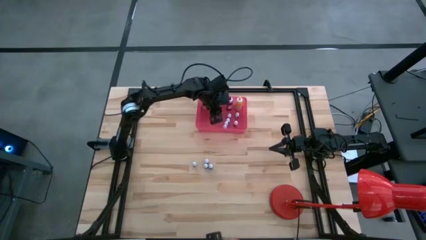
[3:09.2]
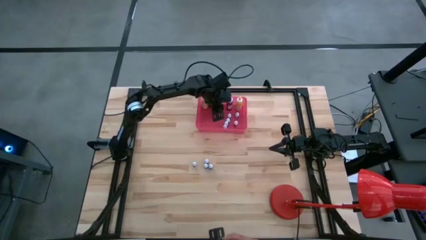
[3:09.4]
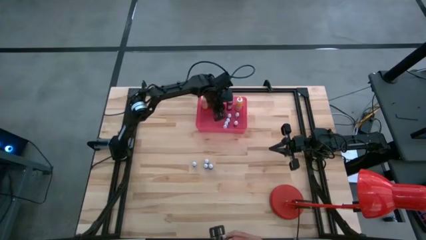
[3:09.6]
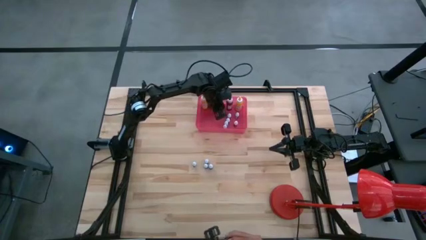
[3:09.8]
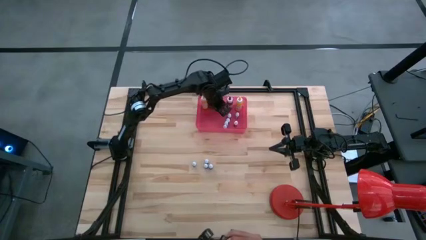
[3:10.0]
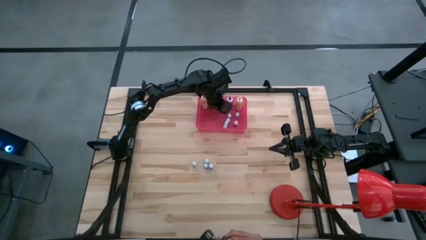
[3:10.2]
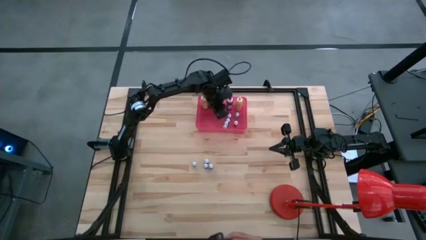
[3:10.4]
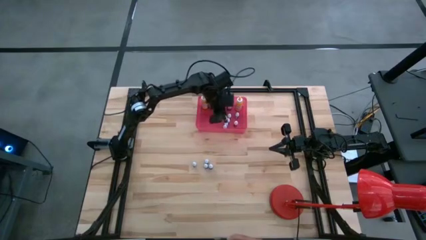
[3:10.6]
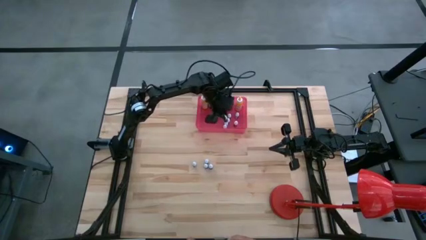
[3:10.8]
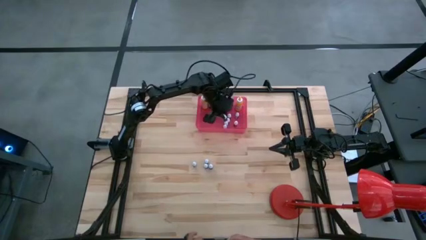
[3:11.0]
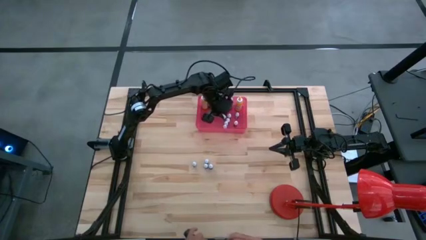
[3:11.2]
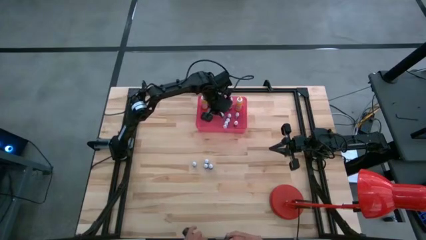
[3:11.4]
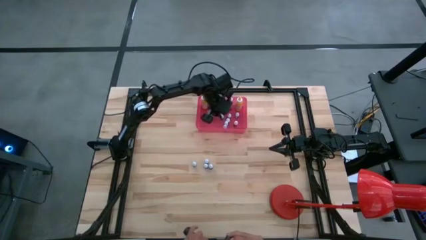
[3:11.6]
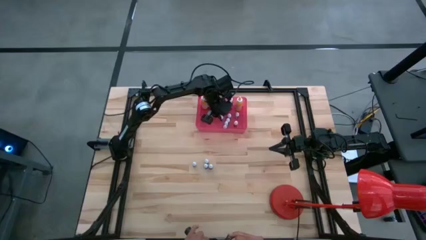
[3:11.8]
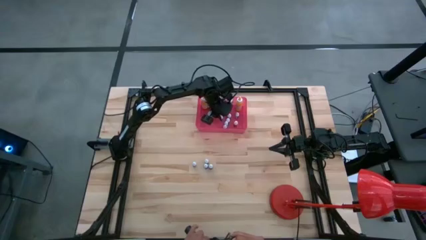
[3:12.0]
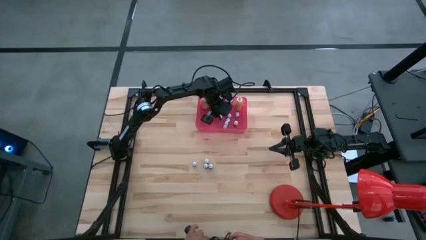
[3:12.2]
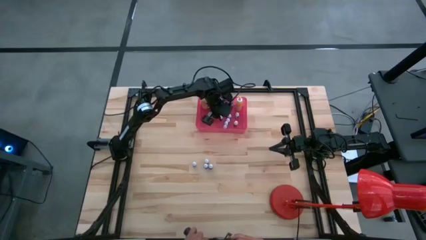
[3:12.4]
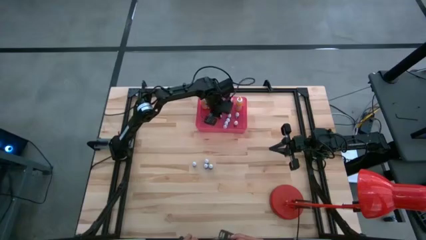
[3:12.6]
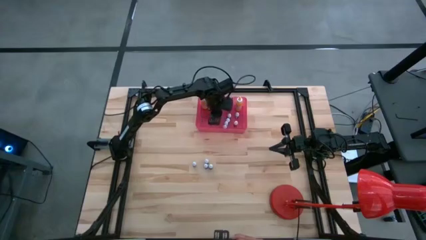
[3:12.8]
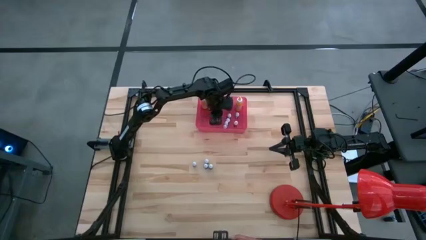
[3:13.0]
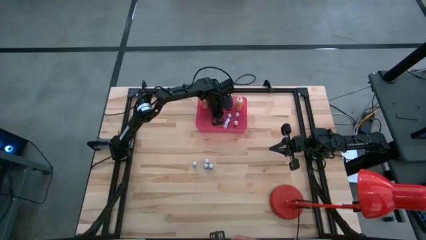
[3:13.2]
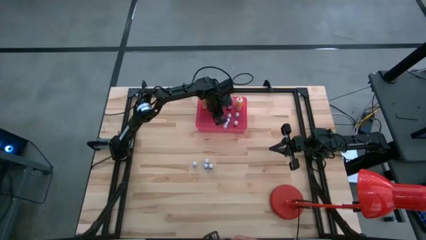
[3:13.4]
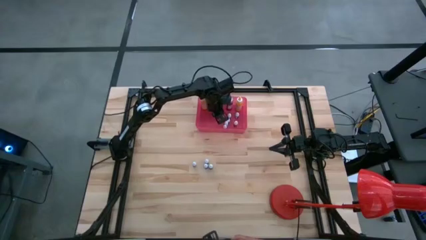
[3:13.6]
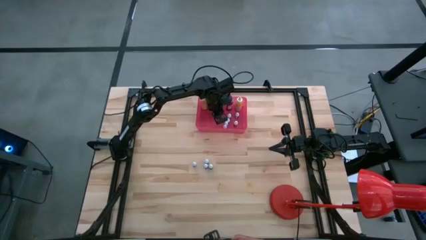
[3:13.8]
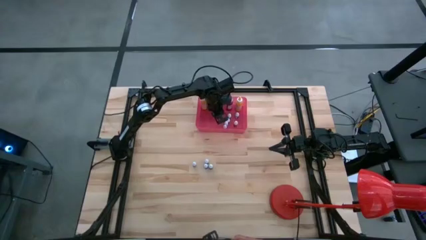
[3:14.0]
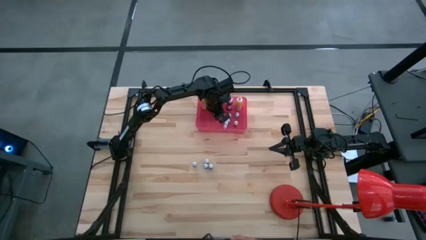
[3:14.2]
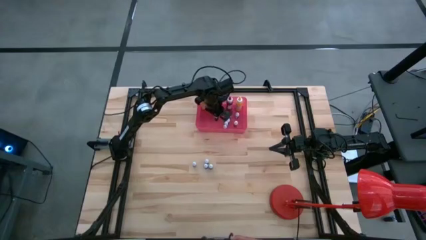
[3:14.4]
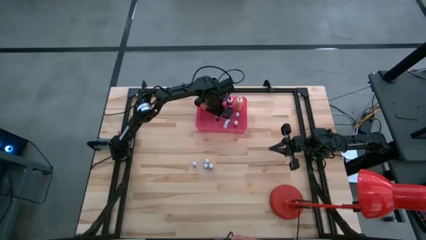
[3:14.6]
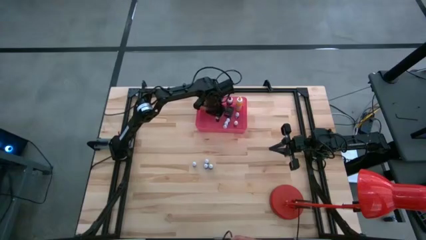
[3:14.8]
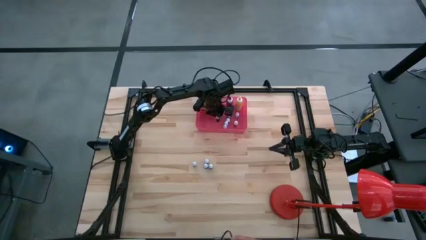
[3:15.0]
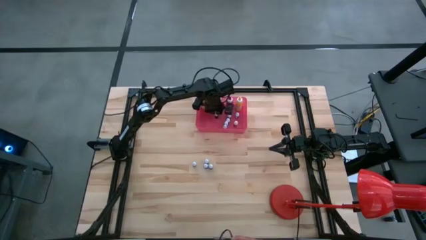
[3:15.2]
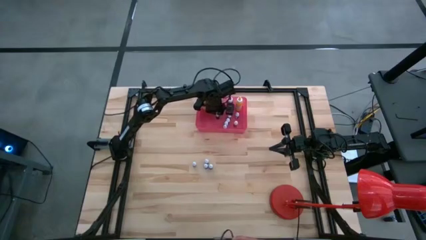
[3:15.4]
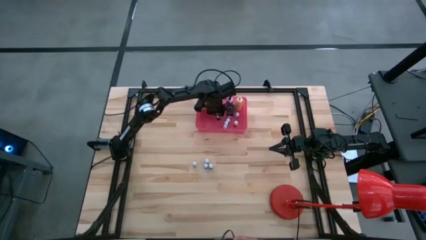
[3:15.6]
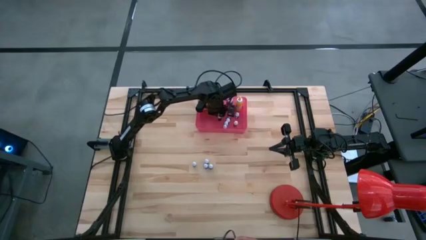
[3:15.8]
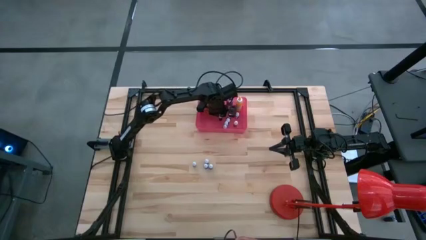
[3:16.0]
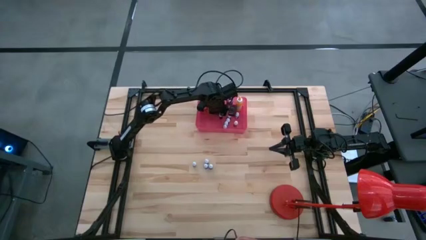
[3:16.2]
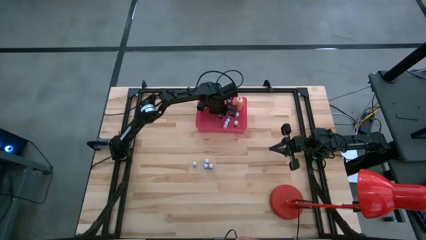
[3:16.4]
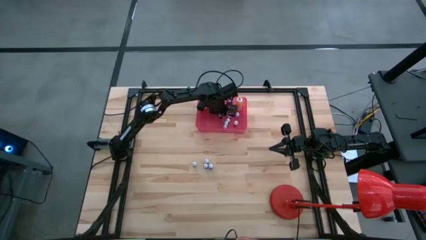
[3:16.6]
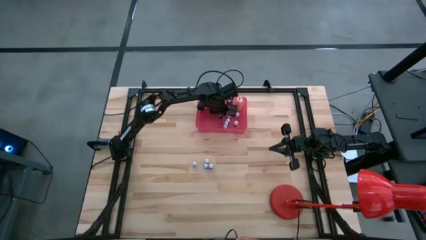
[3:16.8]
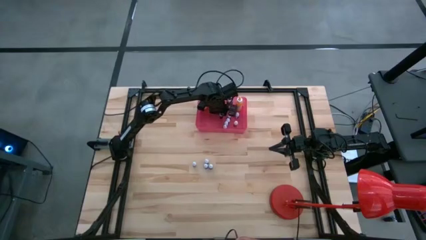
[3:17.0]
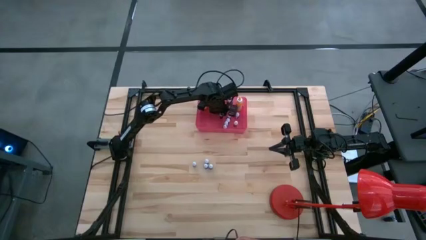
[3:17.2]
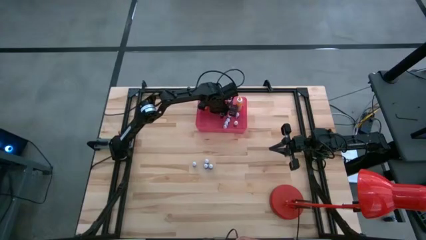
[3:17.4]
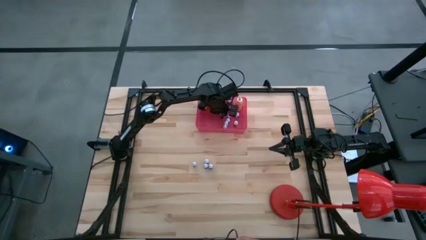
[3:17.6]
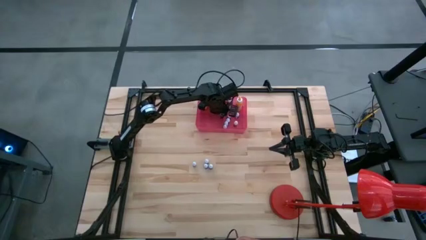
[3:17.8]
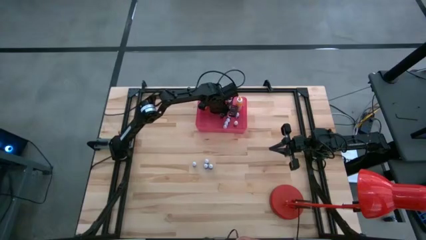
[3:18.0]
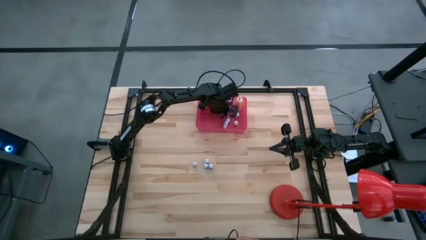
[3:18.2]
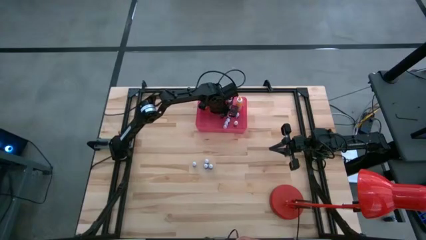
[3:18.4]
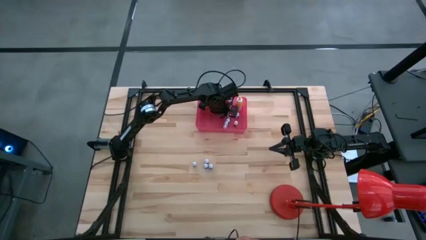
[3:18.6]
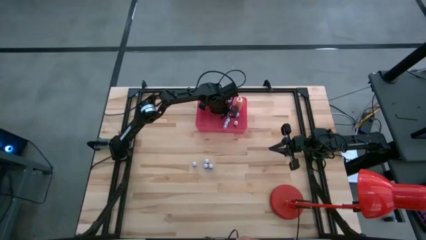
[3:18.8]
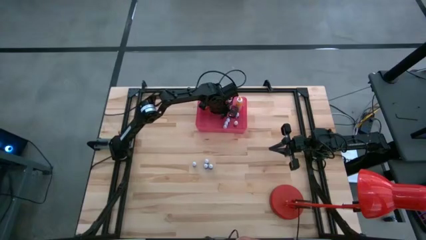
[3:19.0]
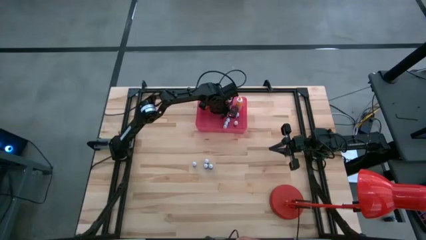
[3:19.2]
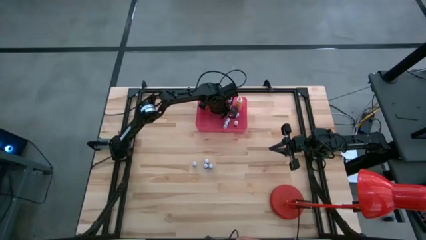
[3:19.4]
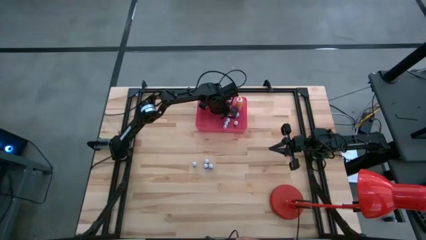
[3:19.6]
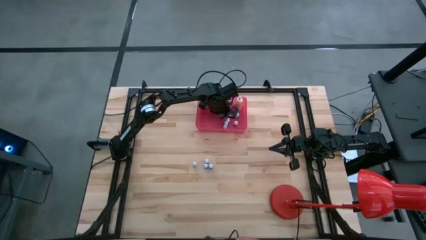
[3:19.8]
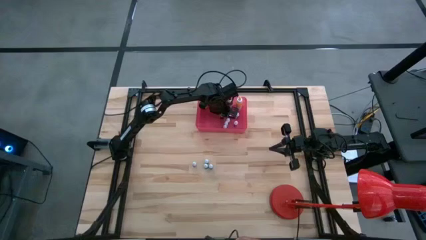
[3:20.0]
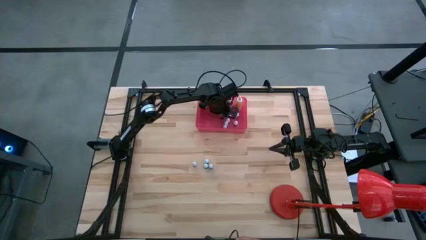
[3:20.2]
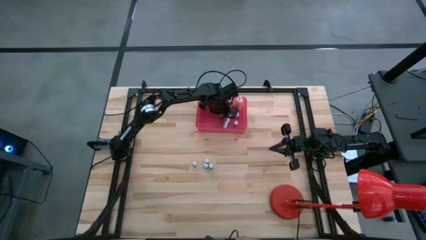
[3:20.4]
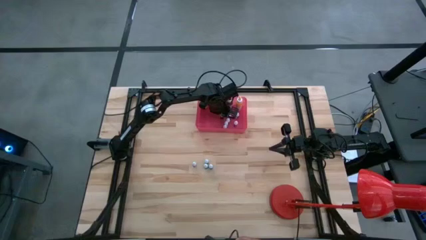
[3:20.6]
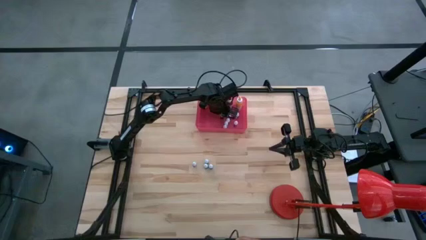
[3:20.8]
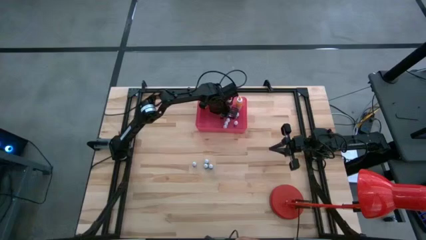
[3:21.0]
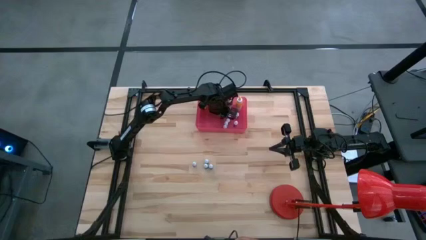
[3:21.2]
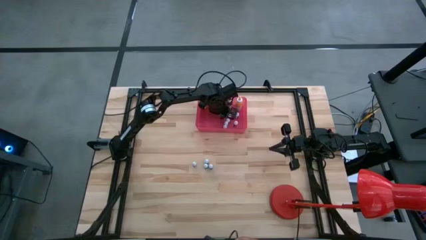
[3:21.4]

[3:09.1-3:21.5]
Task: Pick & Place food coloring
Put the small blue food coloring bottle into the pink bin

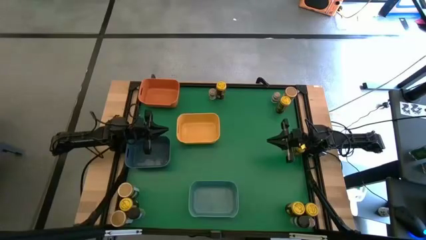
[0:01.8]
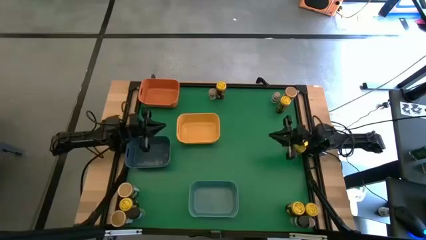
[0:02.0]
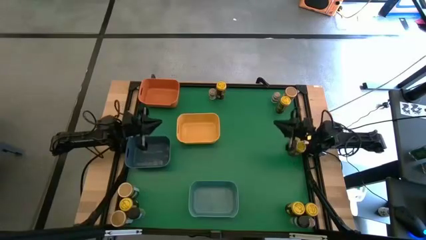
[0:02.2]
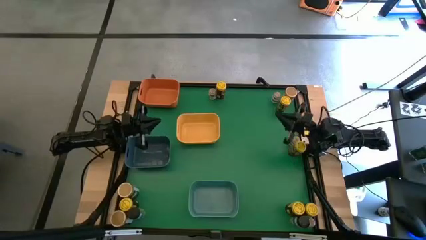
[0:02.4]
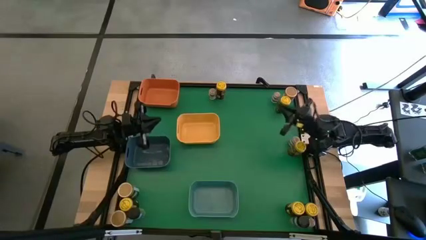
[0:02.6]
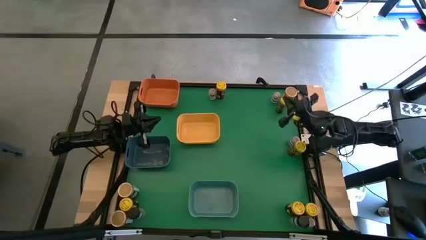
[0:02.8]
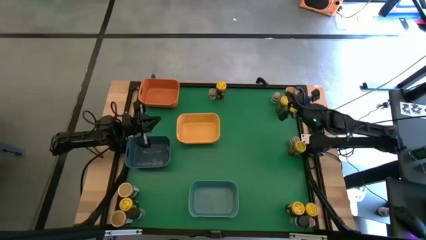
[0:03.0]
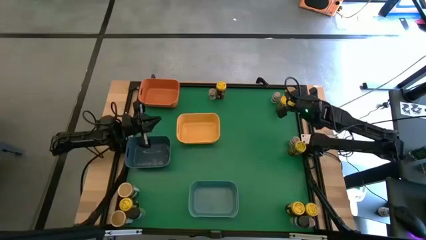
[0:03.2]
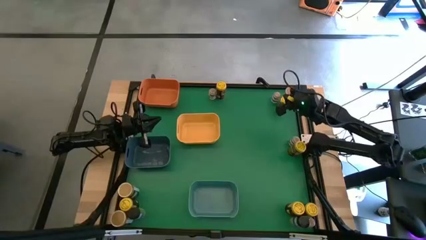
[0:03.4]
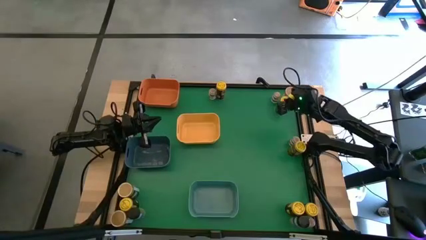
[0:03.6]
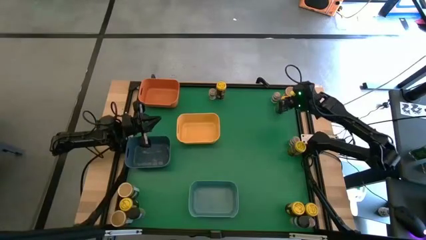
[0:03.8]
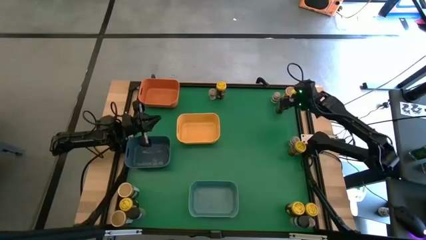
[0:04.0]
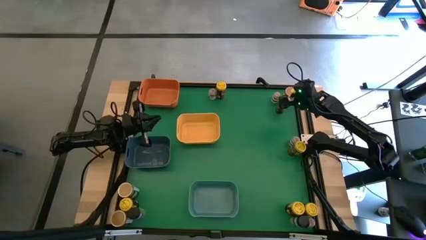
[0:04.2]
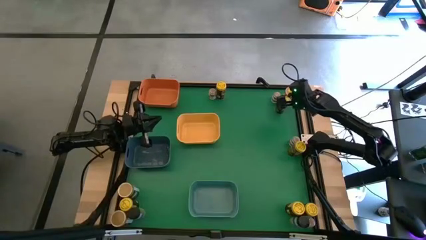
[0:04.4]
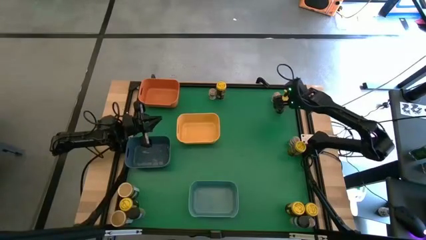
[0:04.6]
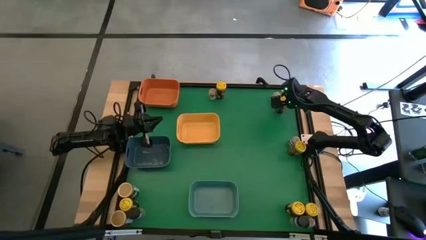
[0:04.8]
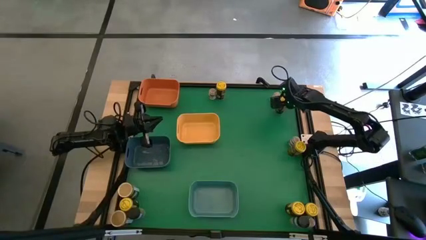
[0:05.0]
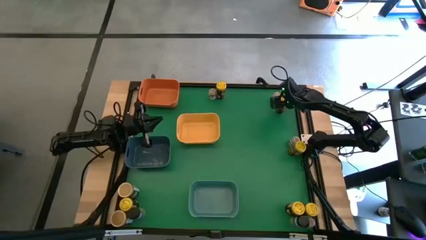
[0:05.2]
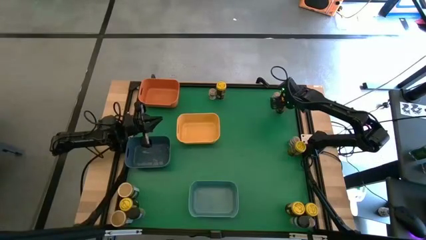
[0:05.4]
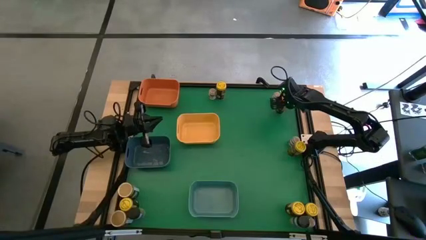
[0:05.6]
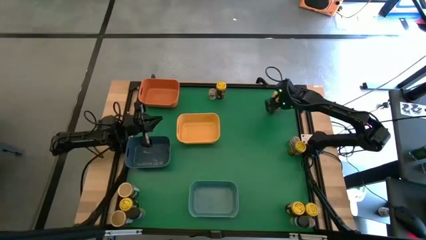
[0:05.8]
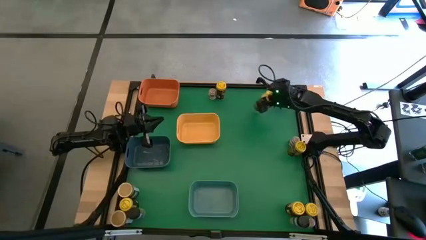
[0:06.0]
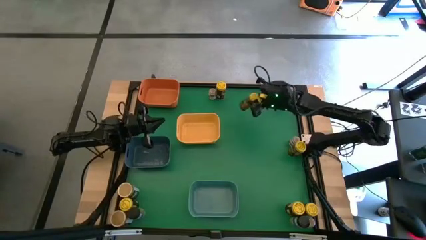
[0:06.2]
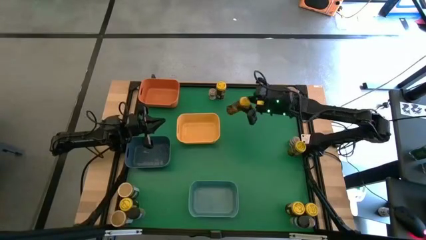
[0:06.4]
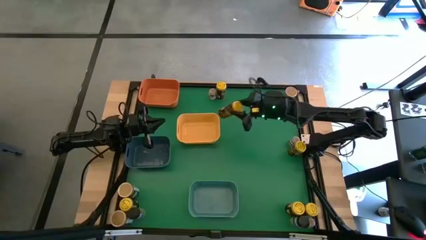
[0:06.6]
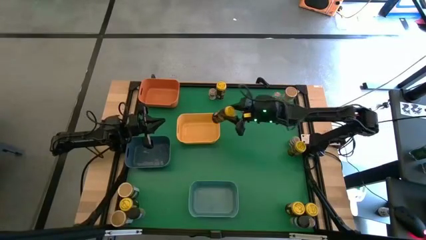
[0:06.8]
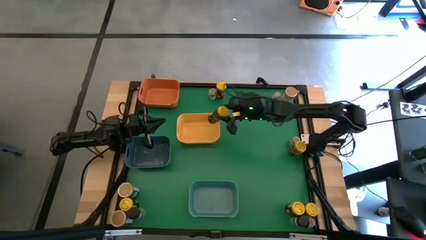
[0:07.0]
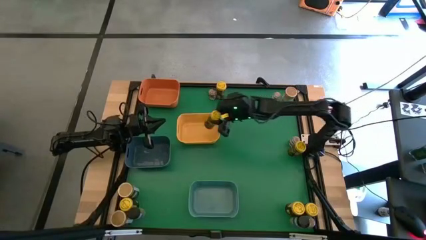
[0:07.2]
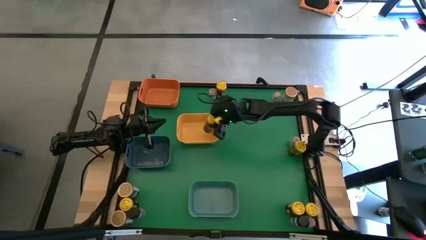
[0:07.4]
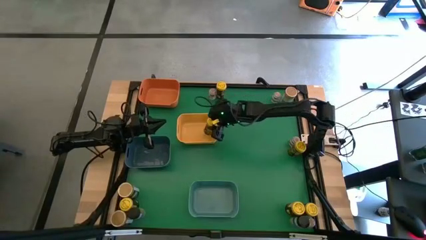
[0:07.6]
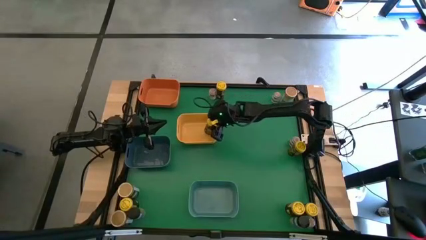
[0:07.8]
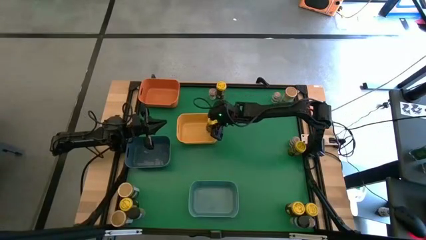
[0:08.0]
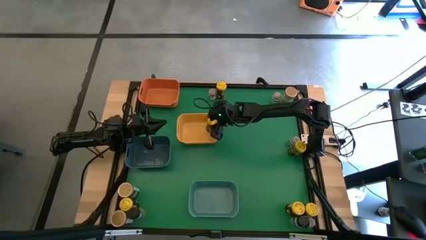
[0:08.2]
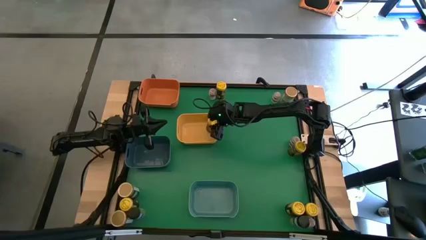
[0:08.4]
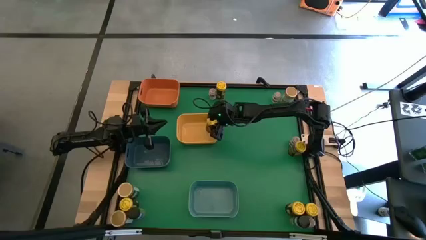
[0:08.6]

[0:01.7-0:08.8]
Task: Sort spices by type
Put the yellow seasoning bottle into the yellow bin
